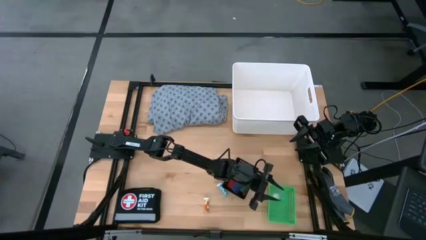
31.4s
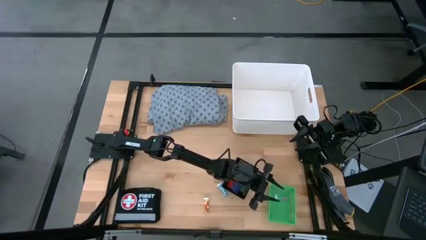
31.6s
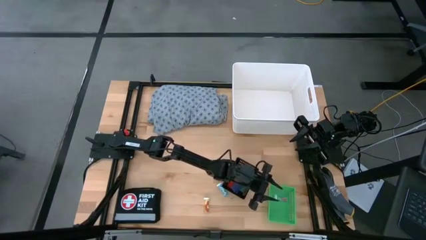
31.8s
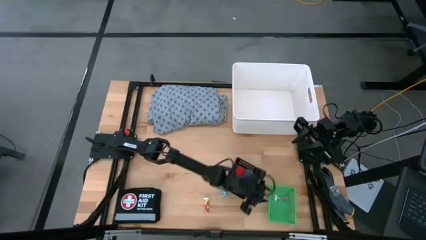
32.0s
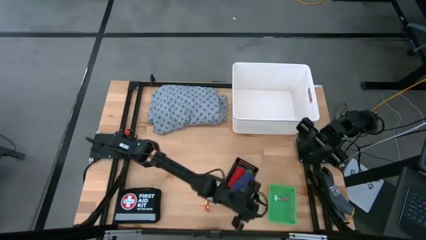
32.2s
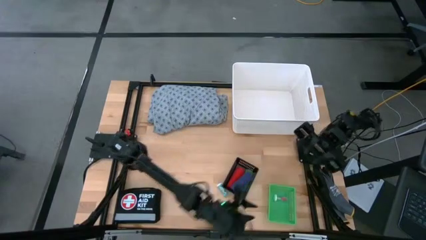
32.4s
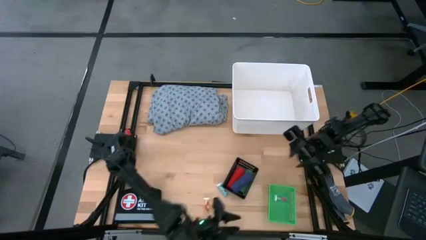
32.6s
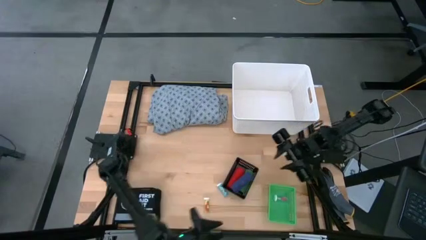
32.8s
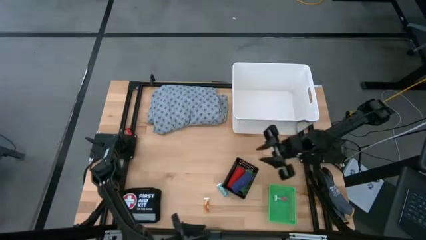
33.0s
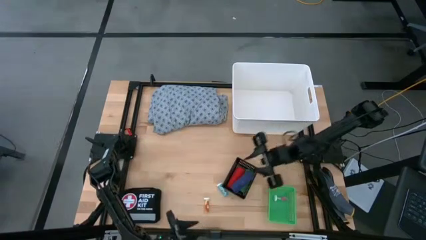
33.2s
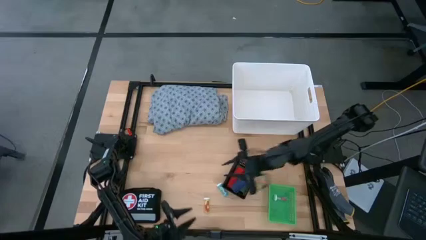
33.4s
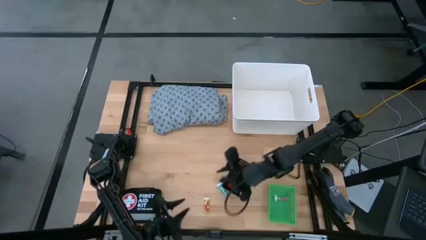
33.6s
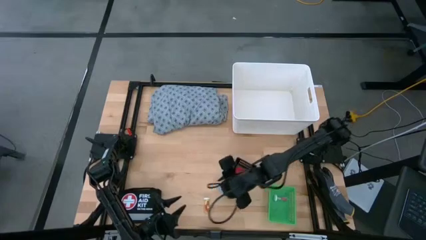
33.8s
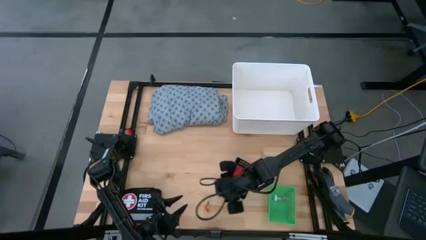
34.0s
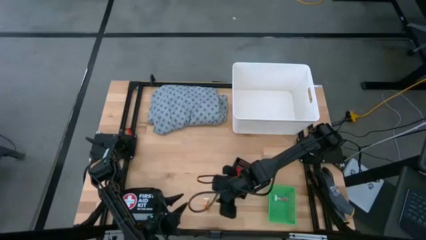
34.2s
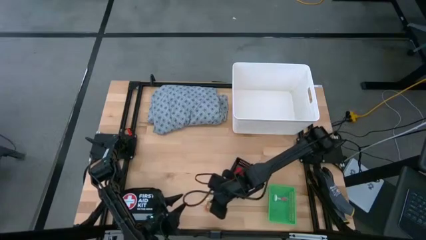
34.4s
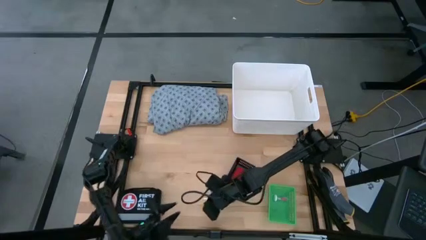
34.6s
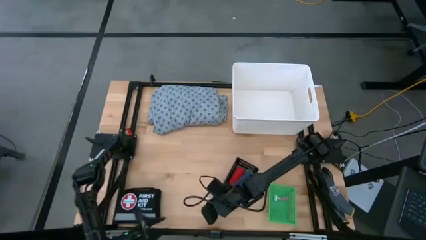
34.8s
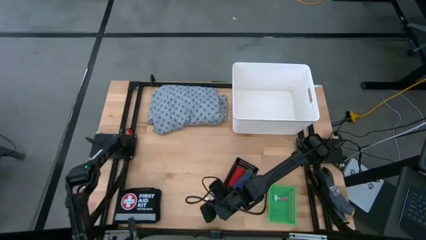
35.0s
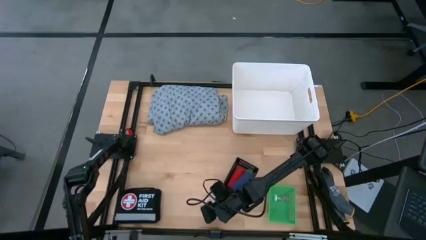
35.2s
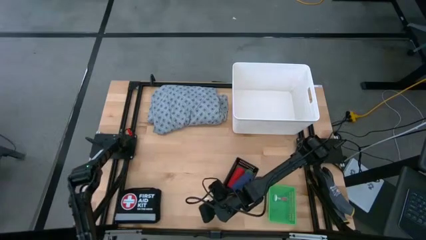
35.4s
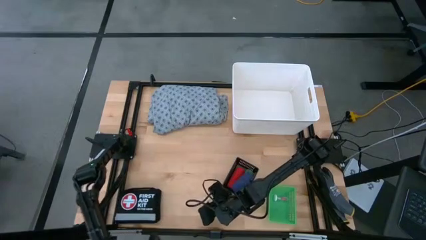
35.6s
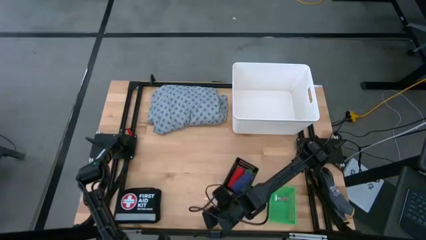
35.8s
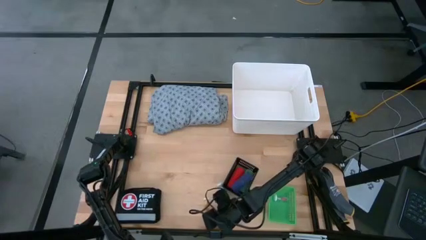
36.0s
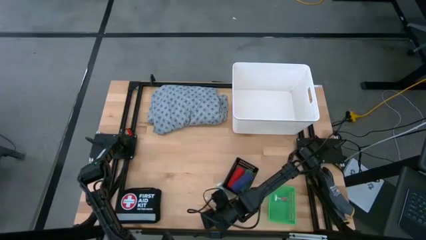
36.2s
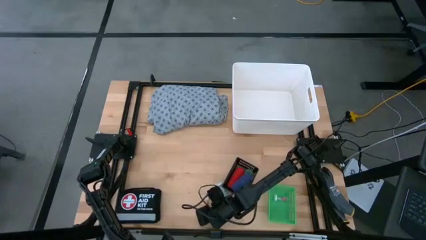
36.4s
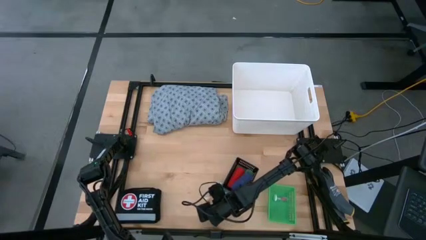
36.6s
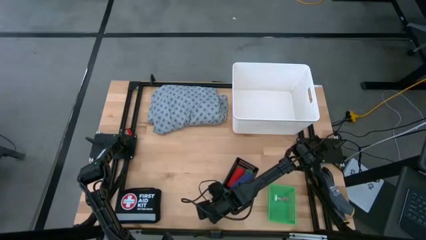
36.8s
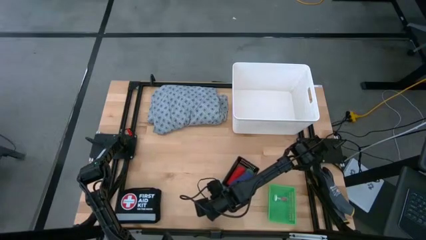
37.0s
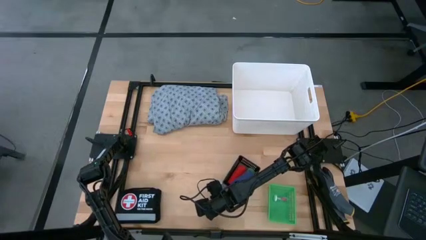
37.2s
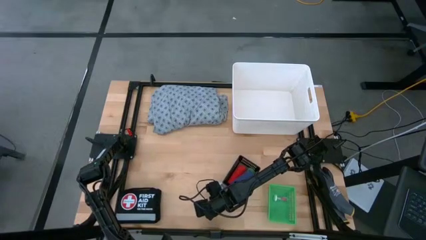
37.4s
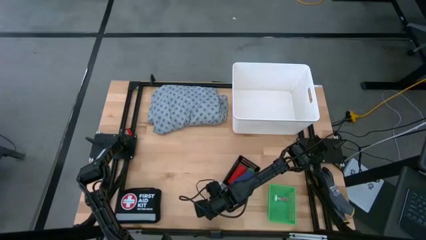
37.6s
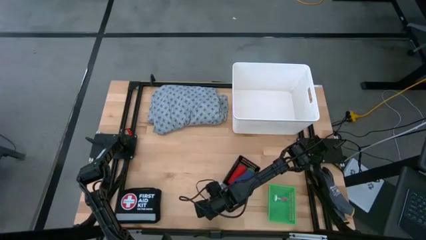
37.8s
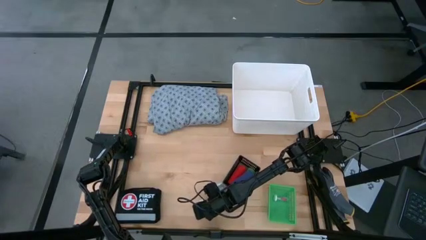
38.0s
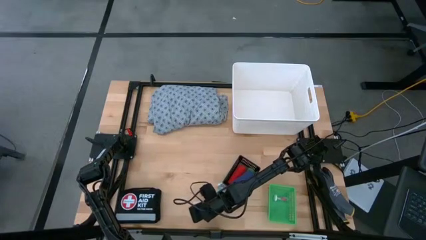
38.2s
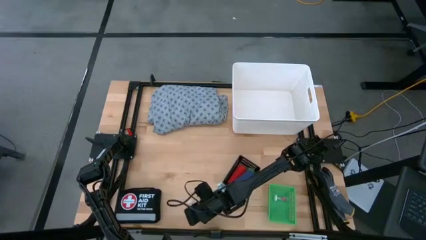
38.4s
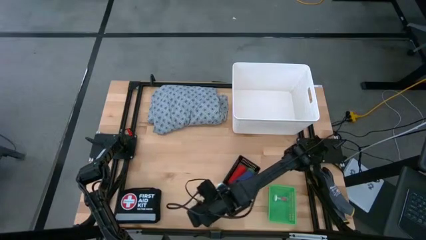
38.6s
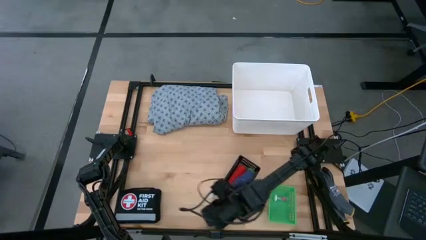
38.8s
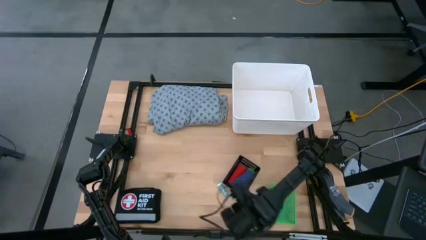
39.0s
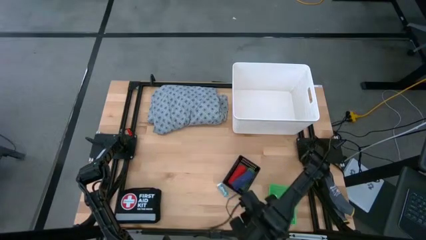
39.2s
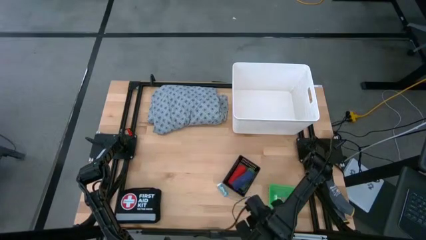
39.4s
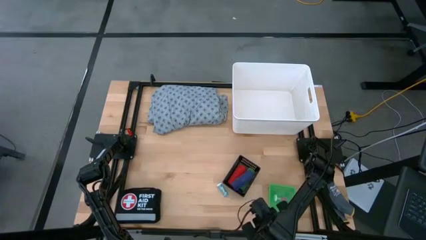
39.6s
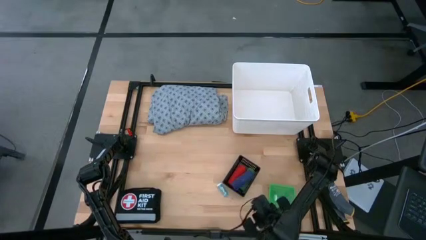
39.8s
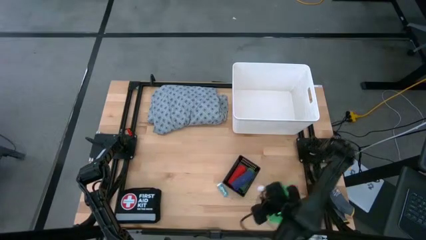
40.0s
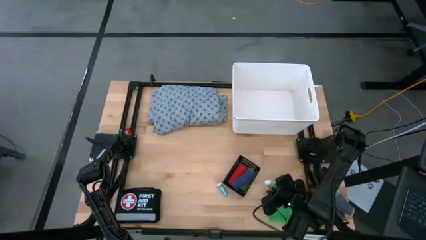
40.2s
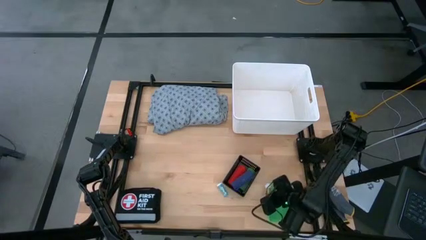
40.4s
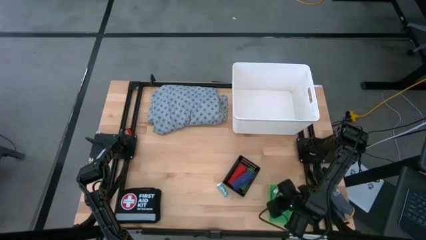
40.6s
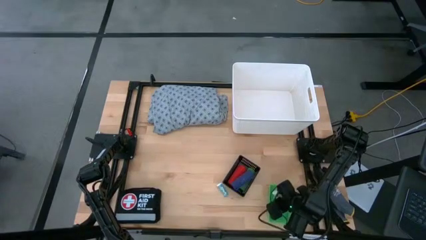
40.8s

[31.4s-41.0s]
Task: Pick & place medical supplies in basket/bin
Put the yellow capsule bottle into the green bin

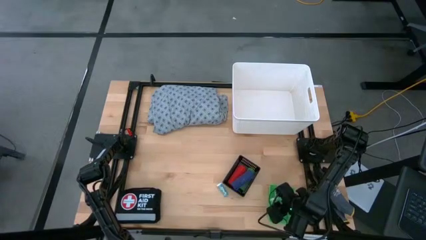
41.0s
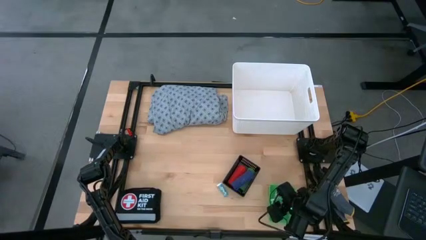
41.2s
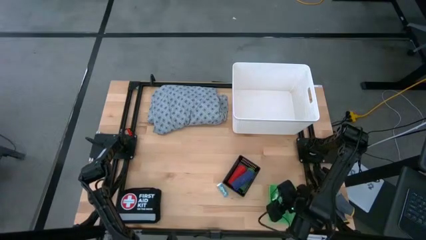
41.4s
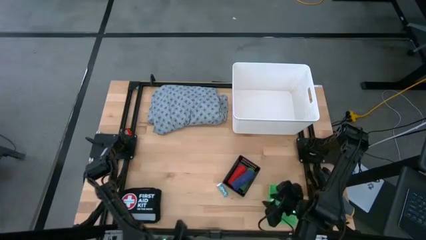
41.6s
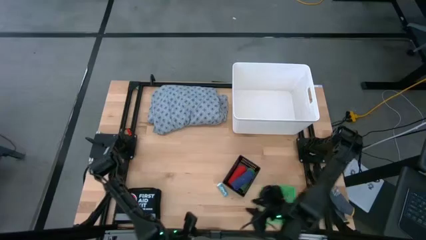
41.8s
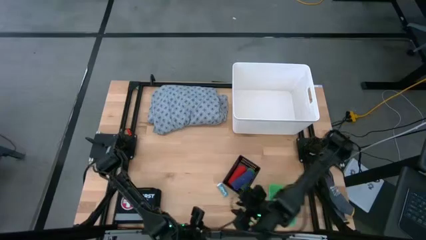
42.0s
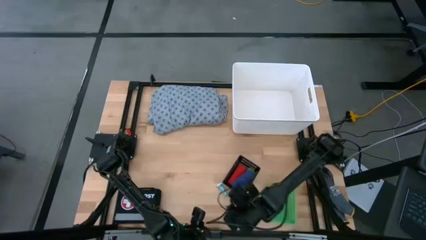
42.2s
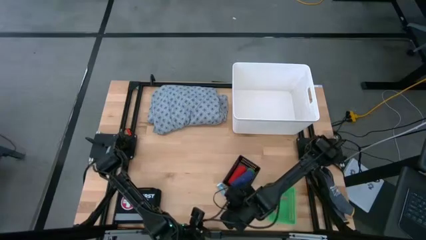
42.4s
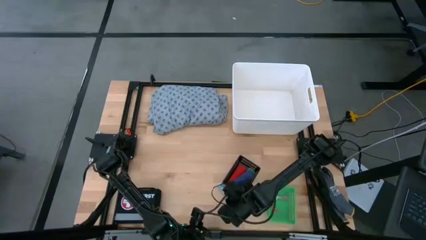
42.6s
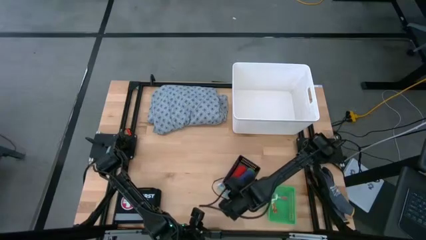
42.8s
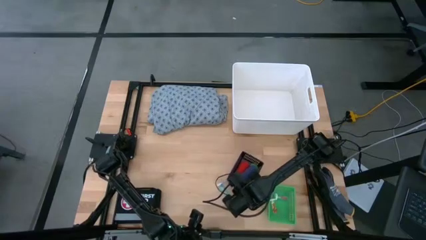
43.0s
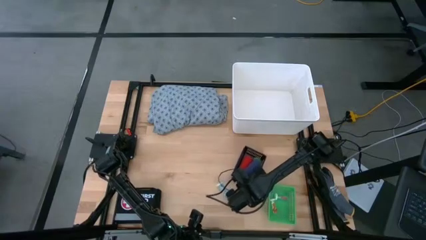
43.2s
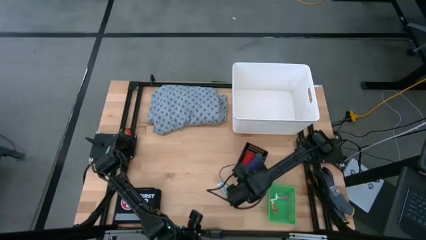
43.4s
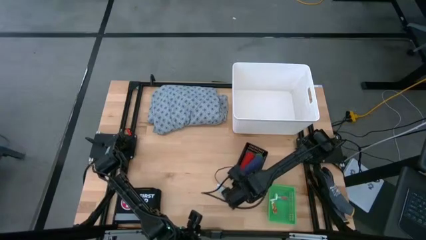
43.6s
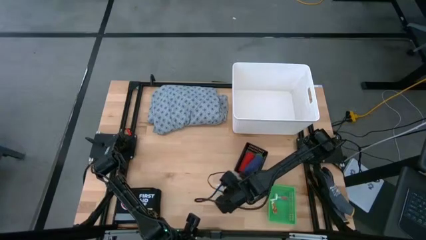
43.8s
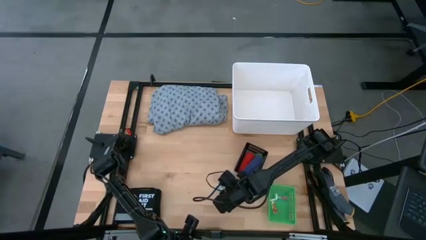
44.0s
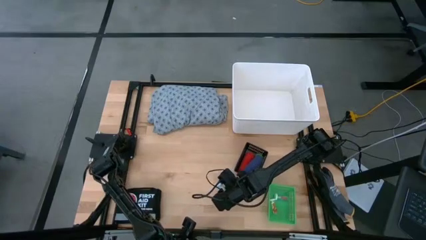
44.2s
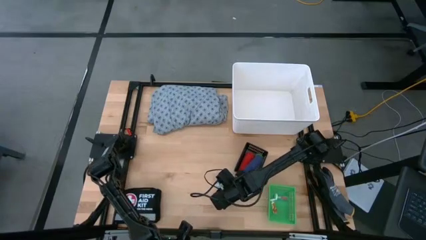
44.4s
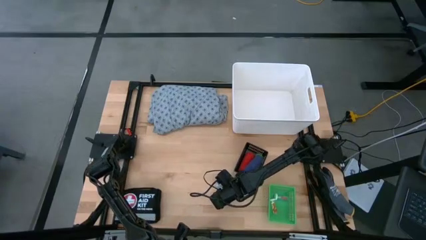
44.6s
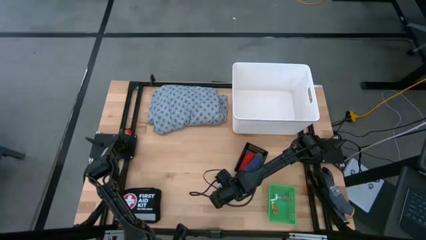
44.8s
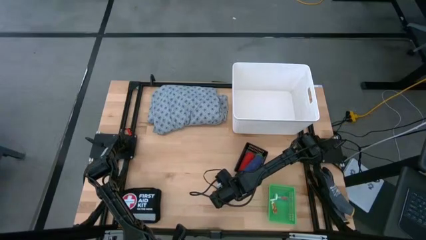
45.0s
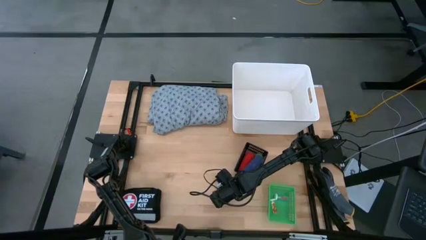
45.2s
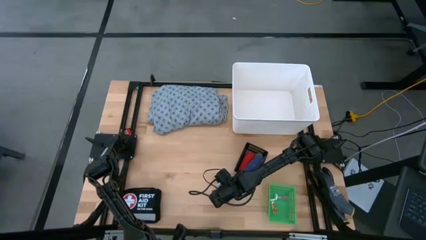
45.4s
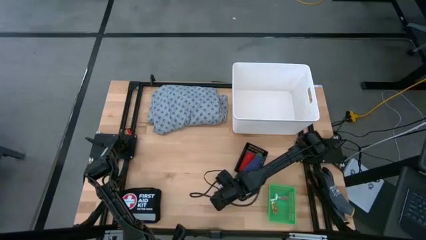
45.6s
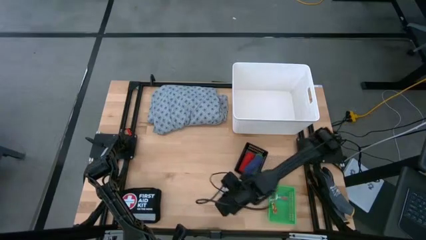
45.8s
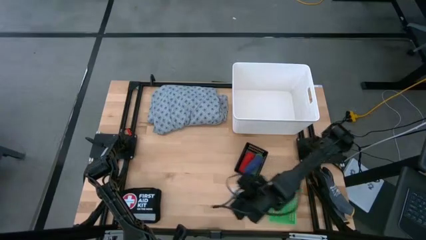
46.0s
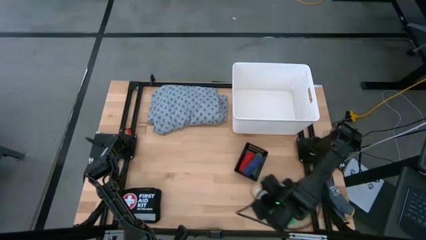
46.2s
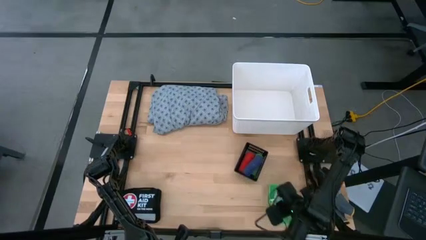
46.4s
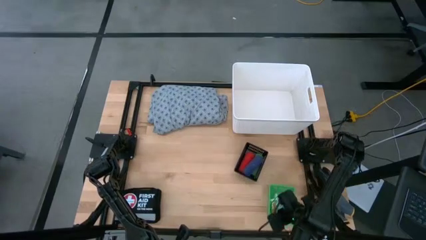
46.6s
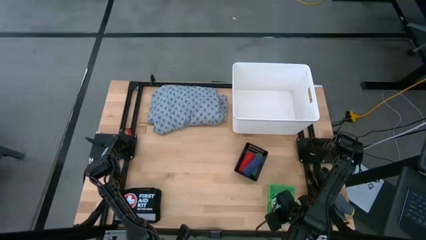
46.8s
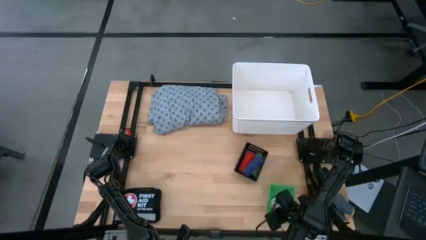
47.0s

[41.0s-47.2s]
Put the blue tablet bottle into the green bin

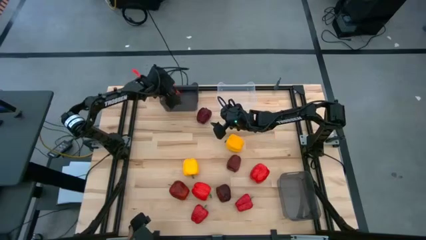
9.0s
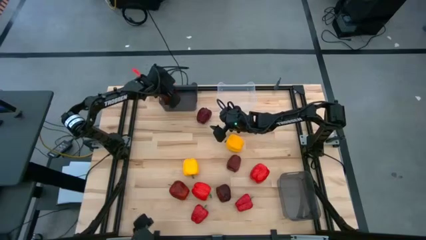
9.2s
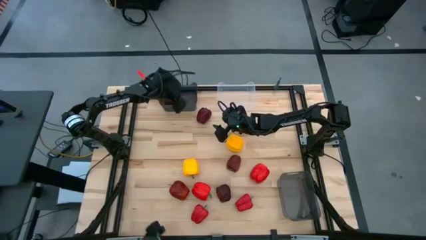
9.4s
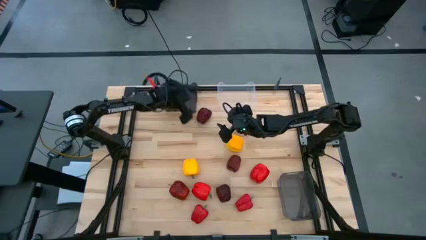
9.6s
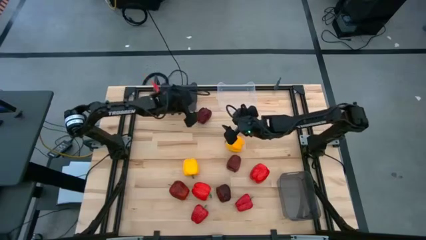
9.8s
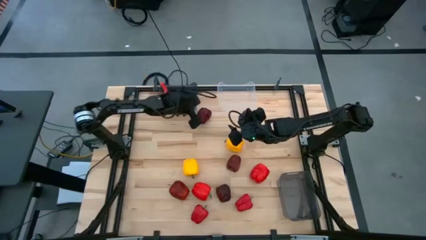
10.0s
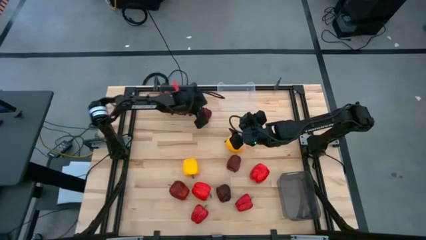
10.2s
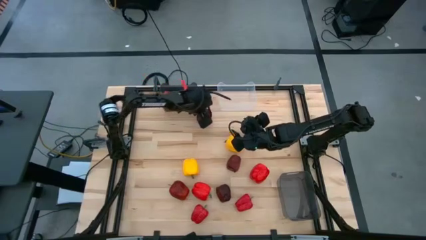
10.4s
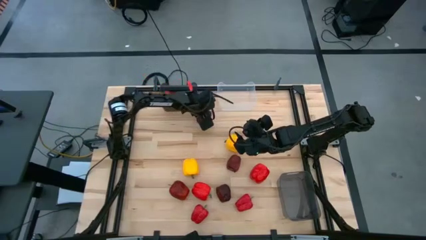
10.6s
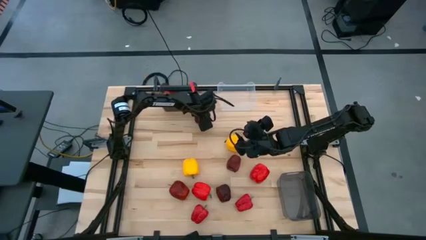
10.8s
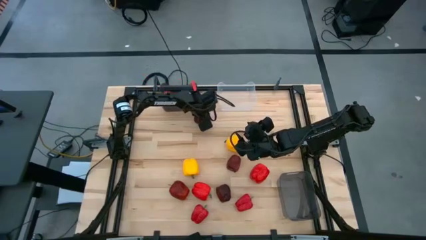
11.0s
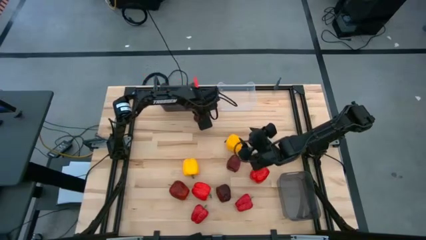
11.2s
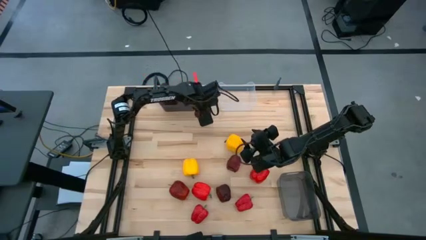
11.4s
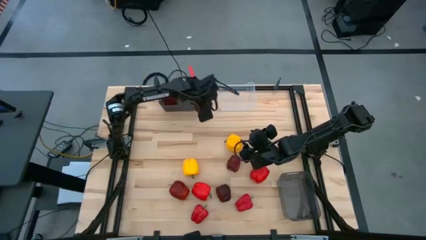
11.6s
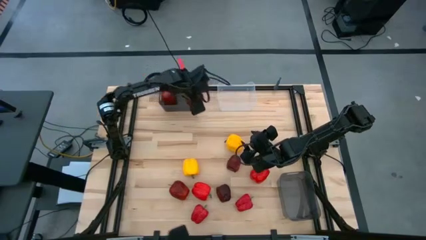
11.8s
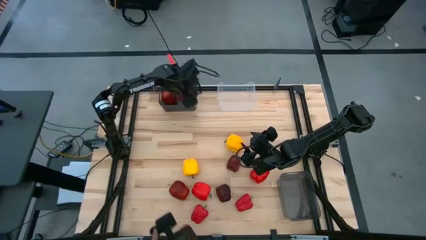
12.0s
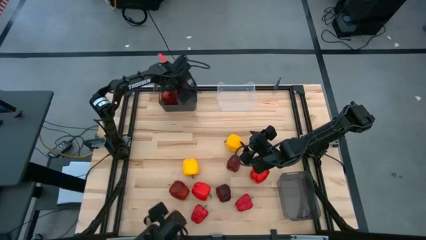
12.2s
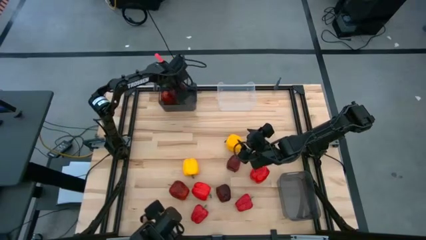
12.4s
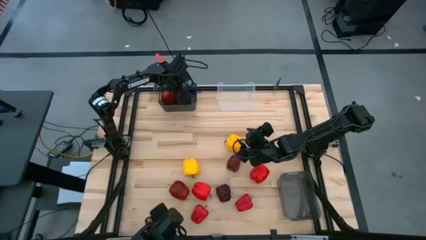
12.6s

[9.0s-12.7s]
Task: Sort produce into baskets
Put the red apple into the top black bin
